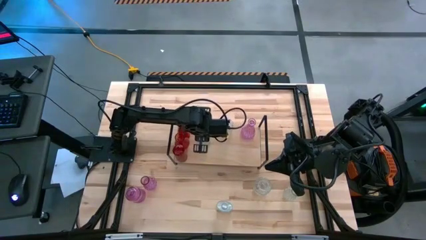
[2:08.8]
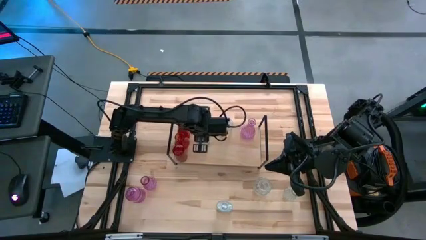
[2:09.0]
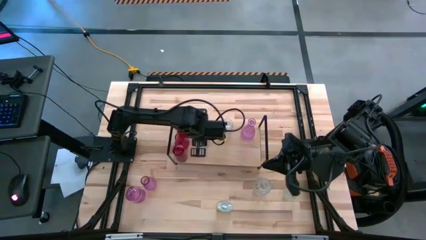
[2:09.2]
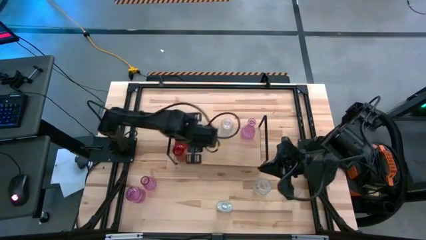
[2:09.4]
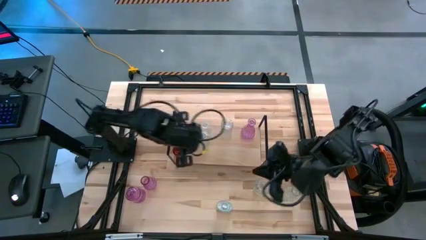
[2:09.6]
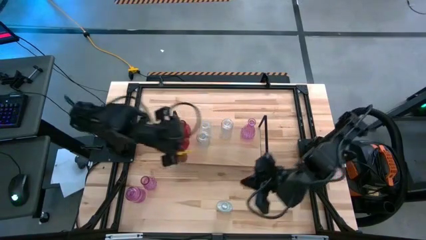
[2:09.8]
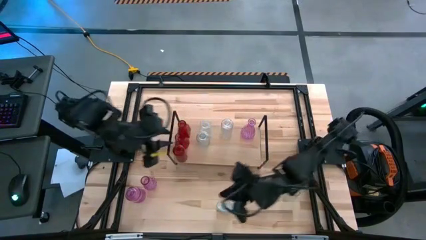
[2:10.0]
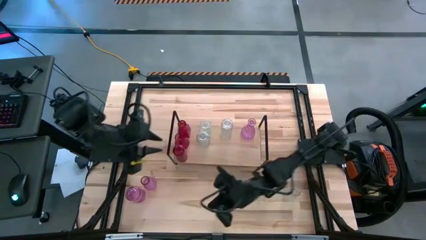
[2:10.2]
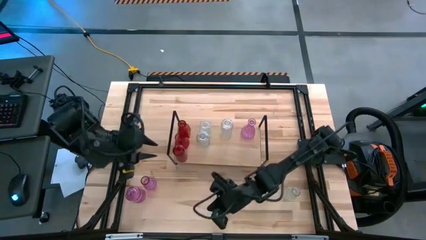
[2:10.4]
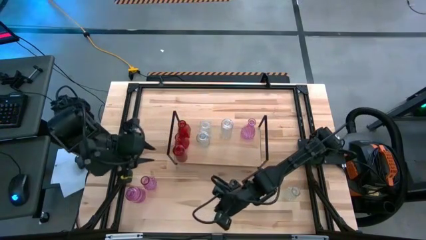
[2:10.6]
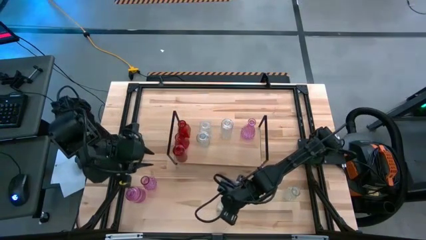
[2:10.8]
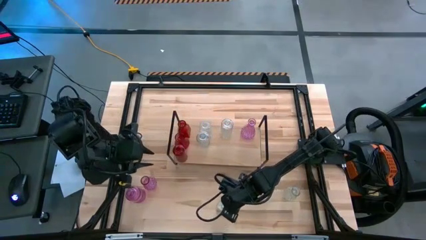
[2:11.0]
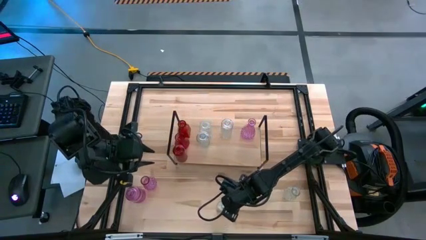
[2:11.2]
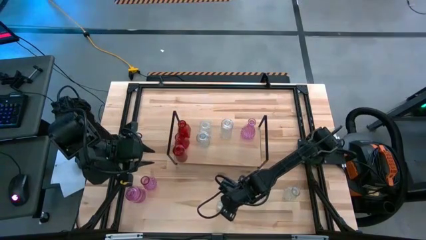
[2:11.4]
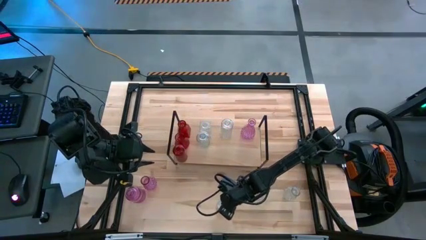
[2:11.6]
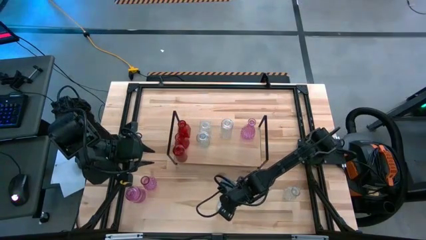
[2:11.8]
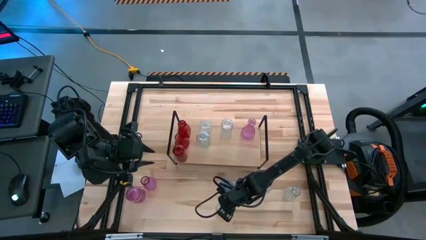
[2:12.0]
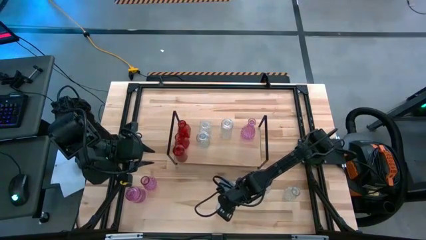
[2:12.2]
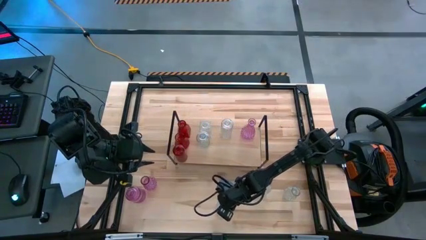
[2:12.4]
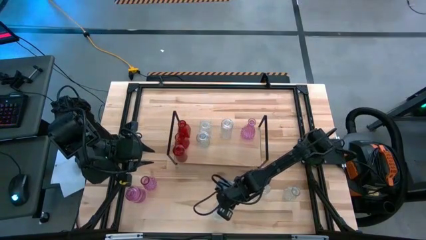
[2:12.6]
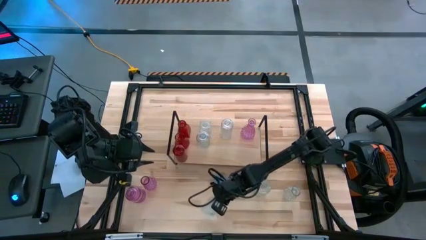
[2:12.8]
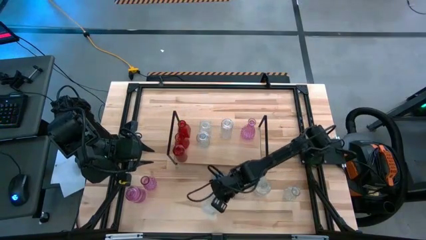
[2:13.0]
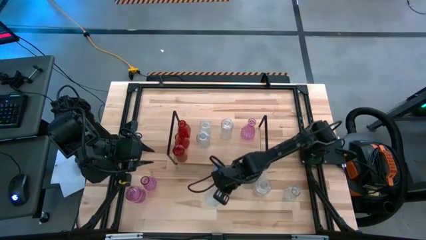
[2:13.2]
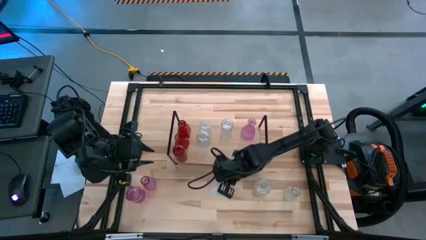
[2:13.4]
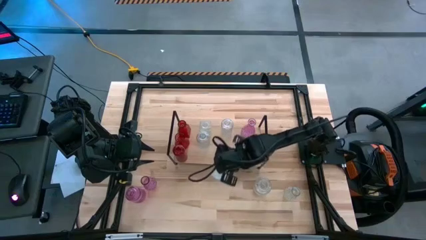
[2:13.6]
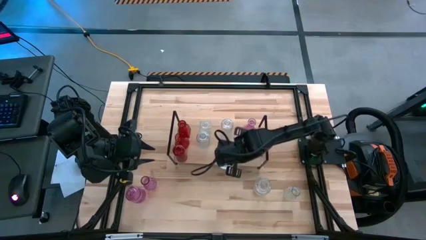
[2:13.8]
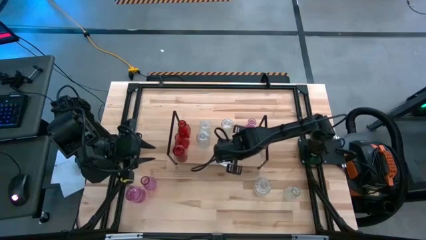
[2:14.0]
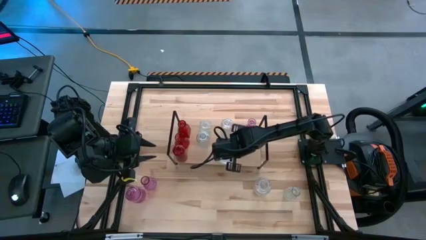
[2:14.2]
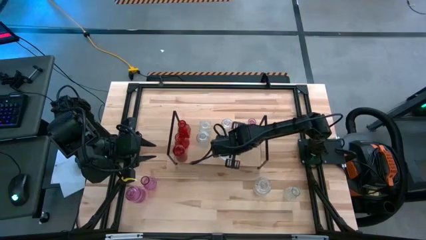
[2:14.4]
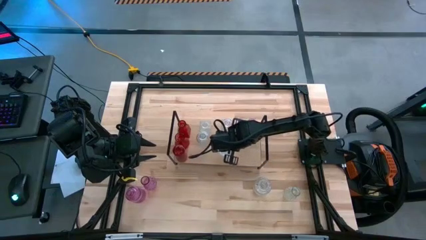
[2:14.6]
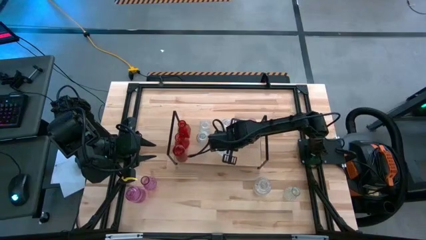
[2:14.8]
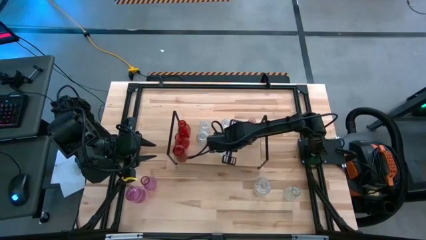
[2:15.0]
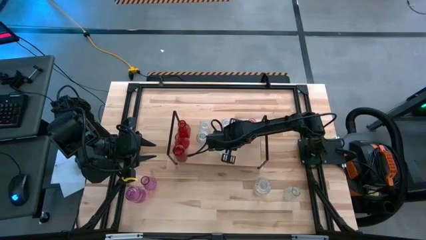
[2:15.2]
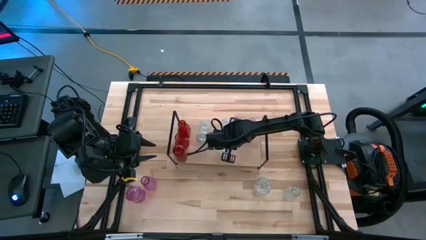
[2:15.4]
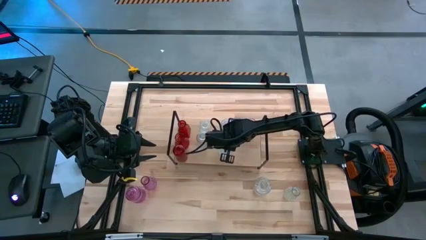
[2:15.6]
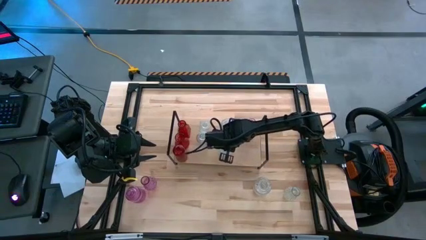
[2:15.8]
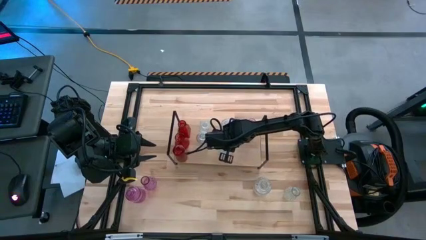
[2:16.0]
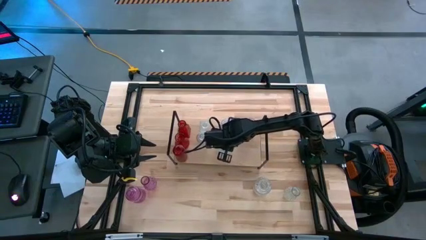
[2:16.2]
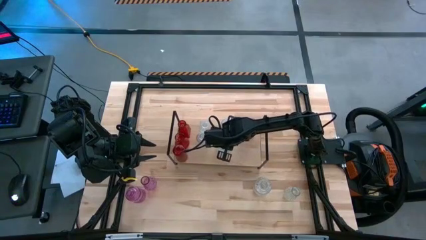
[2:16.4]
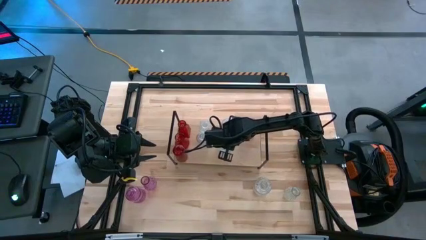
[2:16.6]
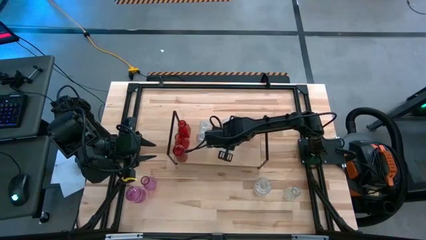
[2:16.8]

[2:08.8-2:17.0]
Task: sort vases onto shelf
Put the transparent vase aligned with the other transparent vase on the shelf

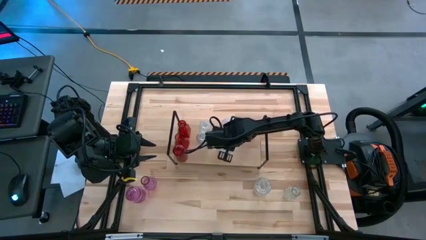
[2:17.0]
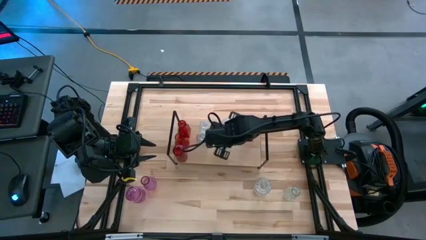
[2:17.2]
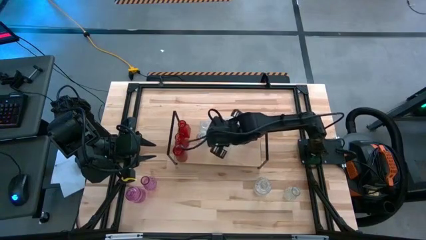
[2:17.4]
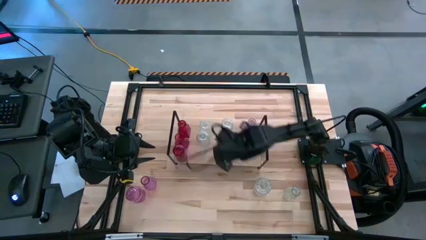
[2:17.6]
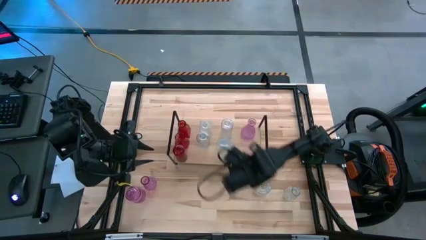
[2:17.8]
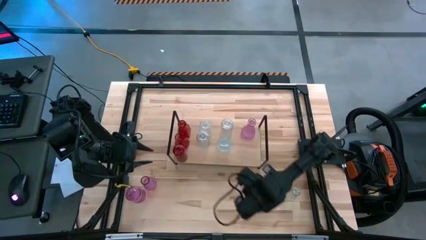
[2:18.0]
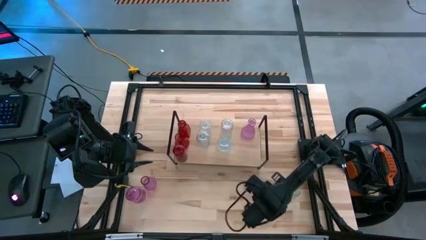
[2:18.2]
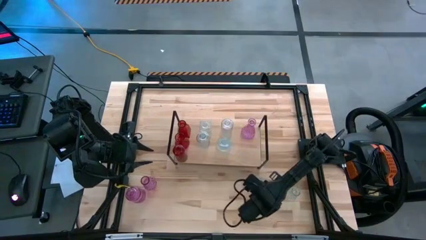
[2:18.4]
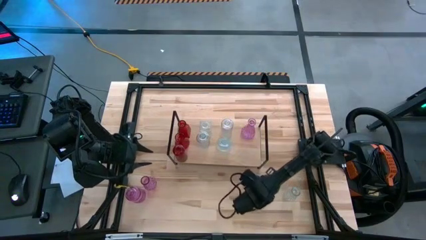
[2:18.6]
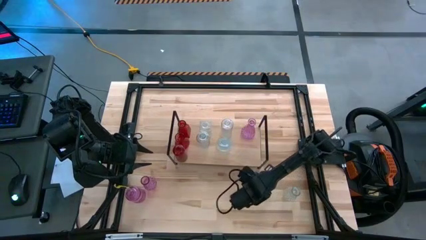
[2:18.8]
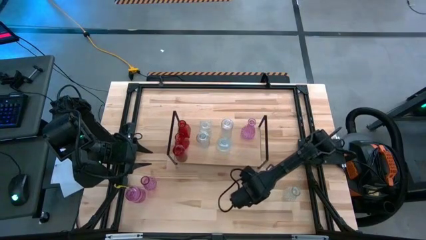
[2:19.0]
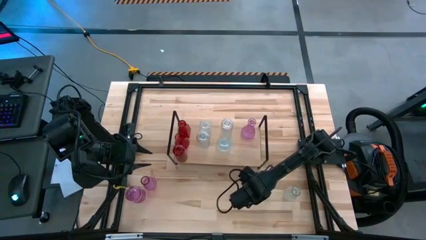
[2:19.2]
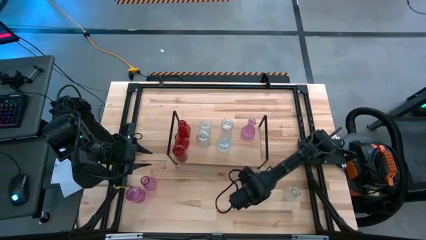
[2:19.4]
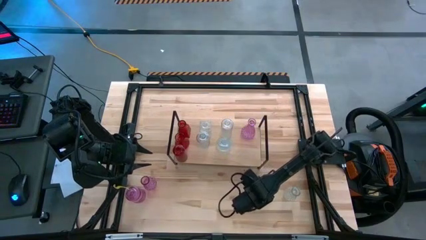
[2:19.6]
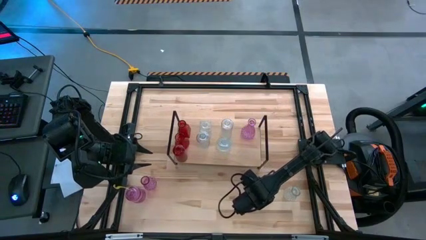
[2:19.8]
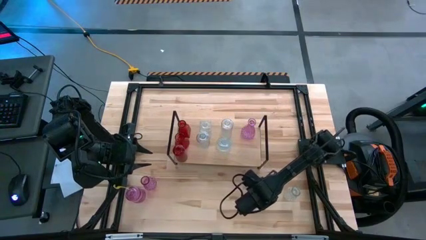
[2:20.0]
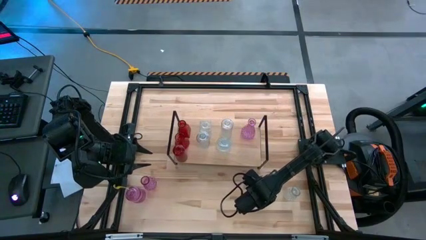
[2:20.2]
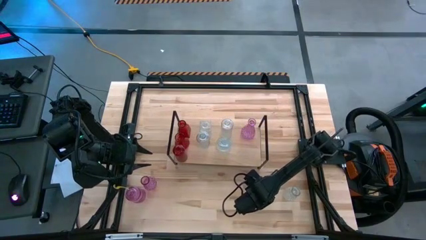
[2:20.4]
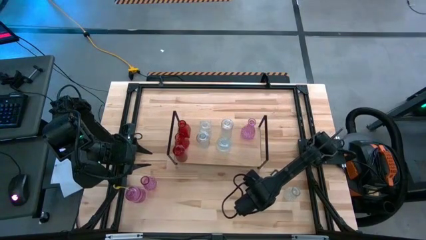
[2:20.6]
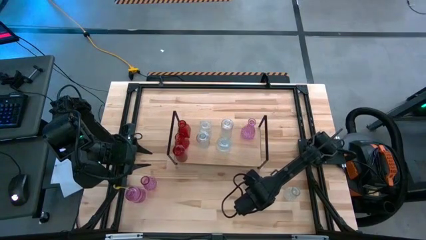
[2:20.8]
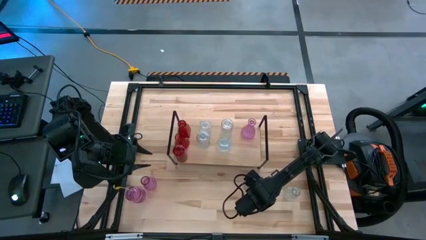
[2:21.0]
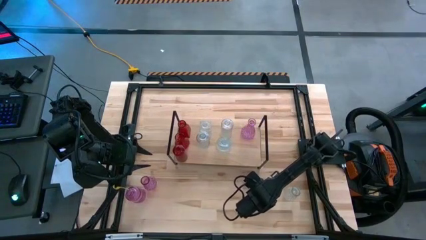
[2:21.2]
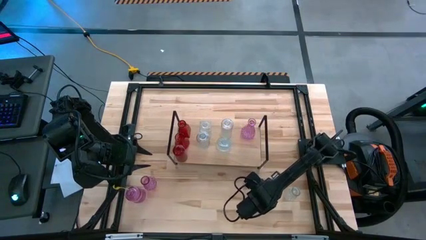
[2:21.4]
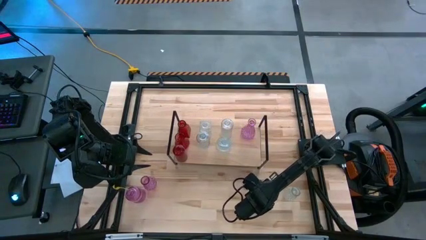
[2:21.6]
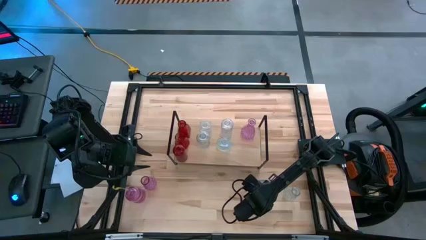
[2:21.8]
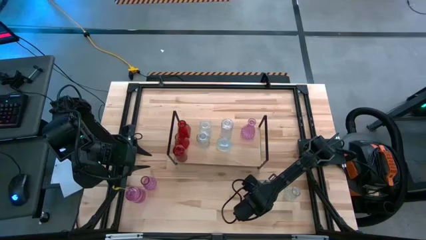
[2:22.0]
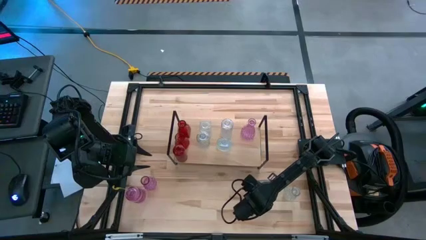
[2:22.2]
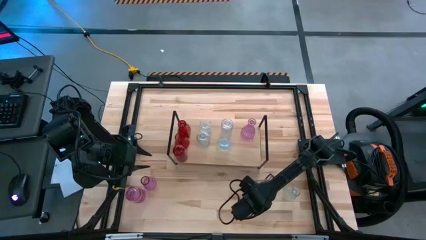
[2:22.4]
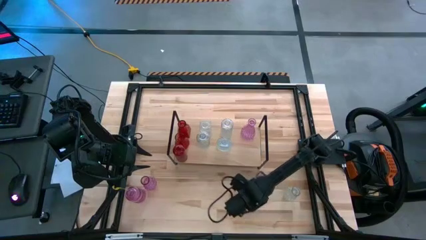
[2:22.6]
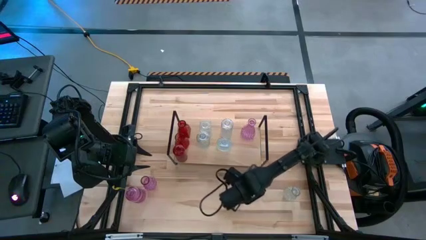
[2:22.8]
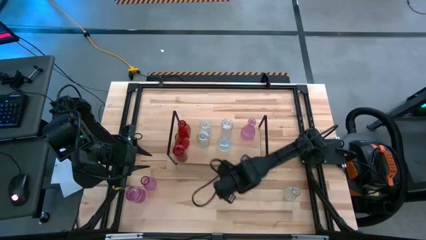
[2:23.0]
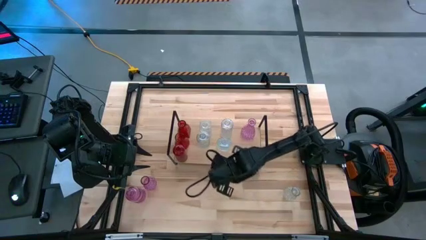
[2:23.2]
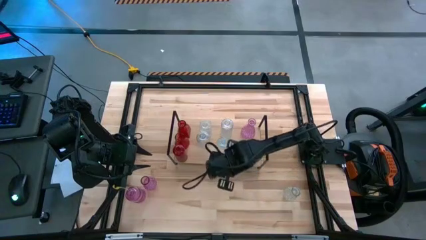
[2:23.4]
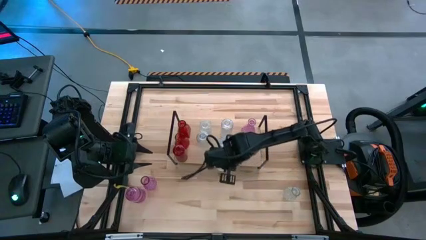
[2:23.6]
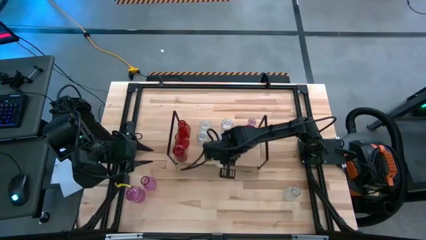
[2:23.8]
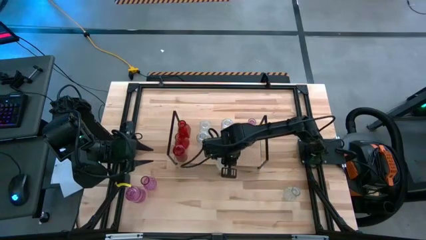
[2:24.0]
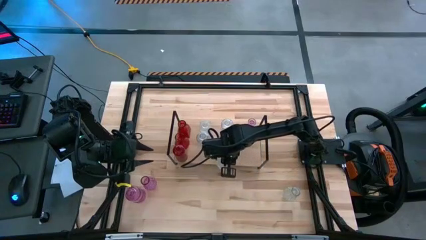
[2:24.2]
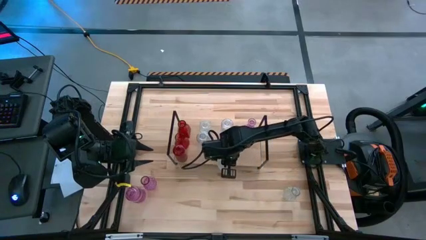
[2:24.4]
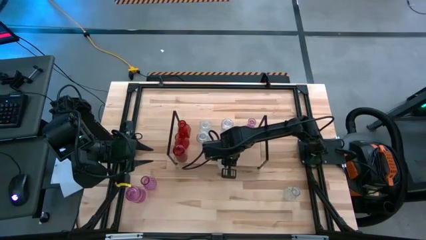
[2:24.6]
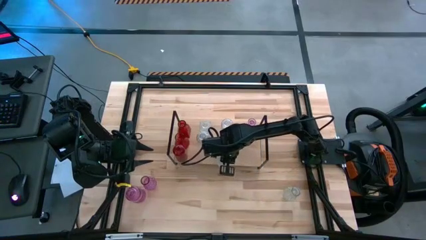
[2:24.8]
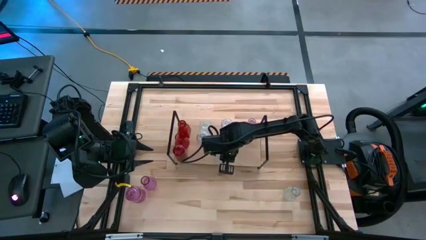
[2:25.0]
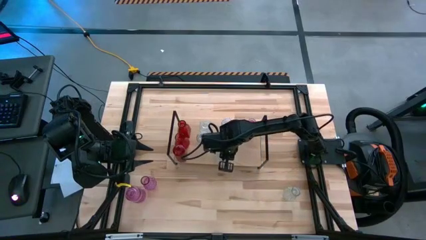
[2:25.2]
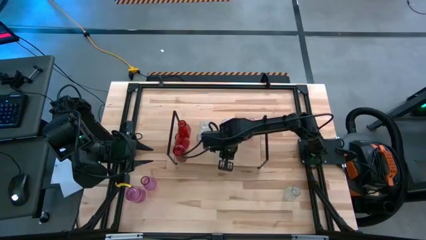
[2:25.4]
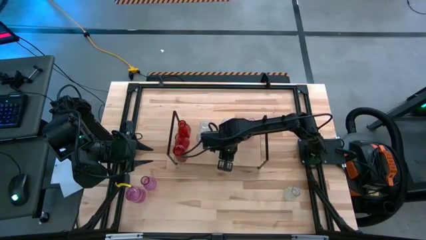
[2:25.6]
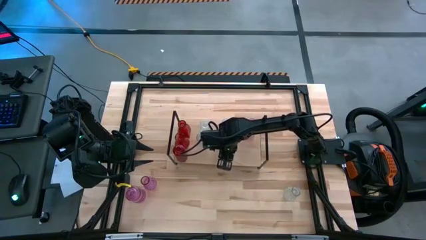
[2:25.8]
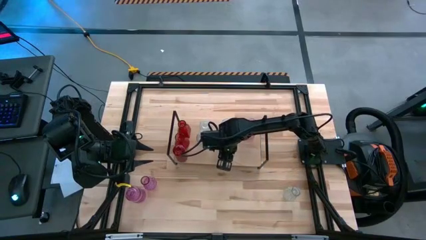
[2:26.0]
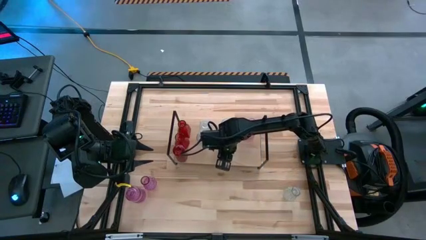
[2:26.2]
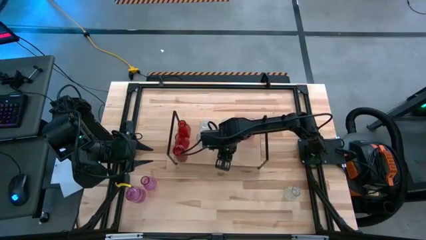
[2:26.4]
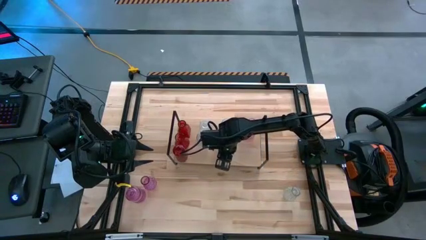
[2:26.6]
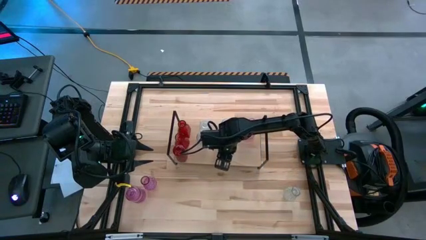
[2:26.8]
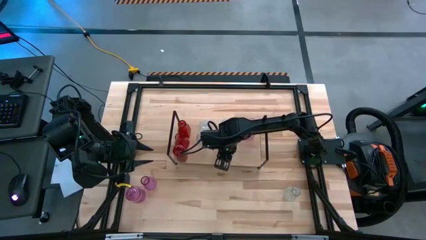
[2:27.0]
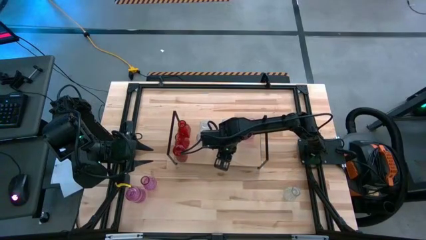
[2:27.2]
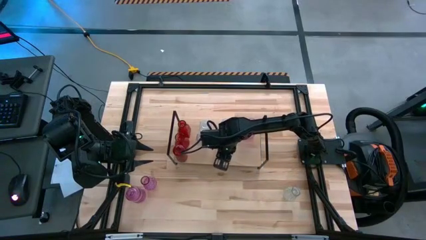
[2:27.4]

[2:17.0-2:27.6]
Put the transparent vase aligned with the other transparent vase on the shelf
